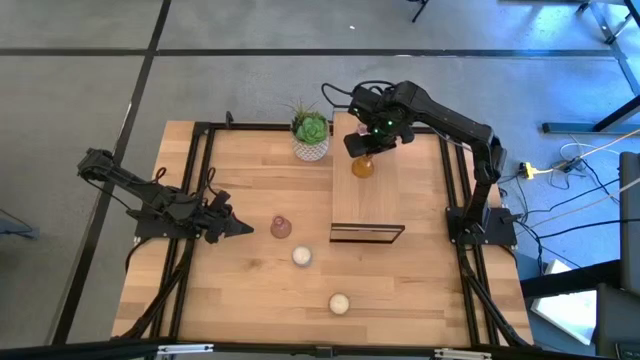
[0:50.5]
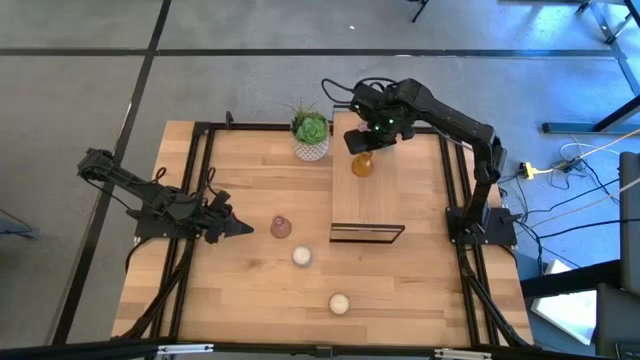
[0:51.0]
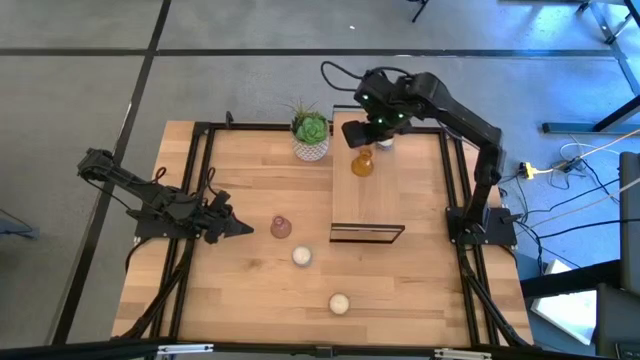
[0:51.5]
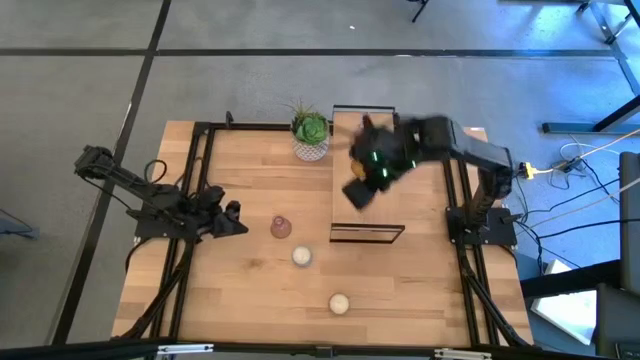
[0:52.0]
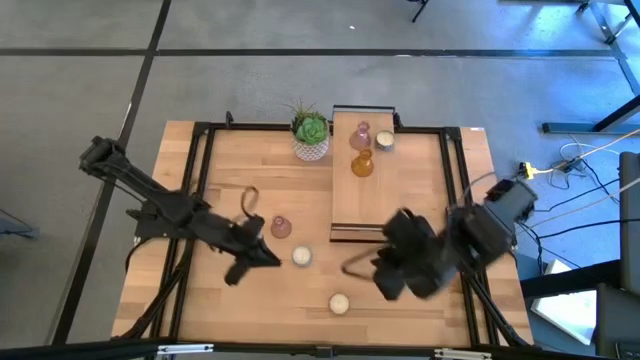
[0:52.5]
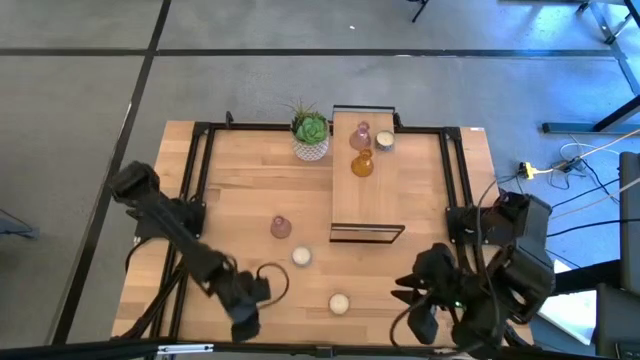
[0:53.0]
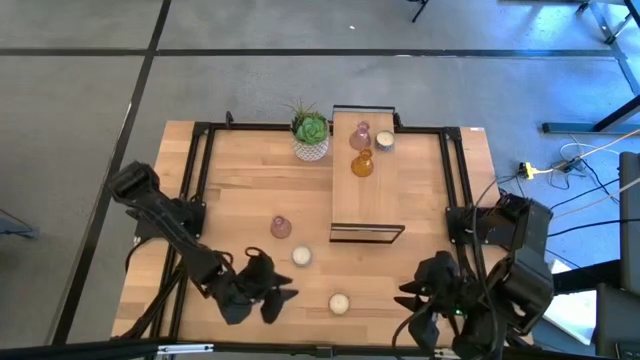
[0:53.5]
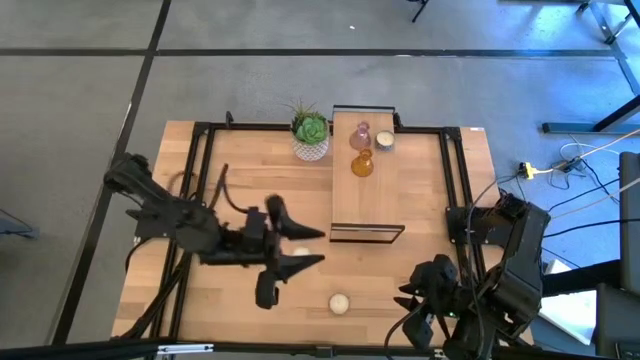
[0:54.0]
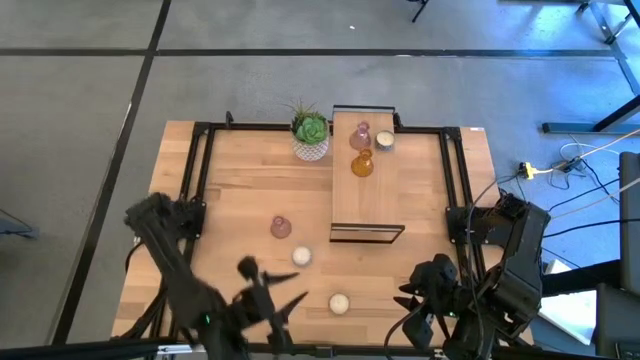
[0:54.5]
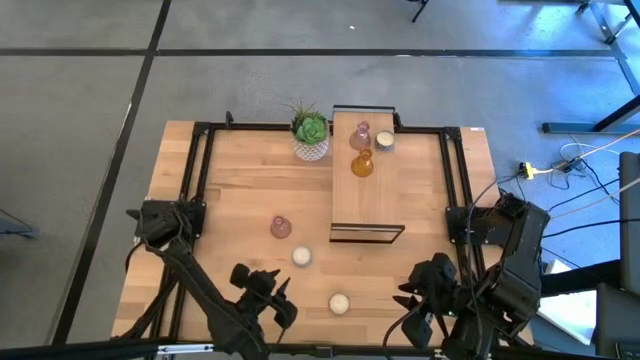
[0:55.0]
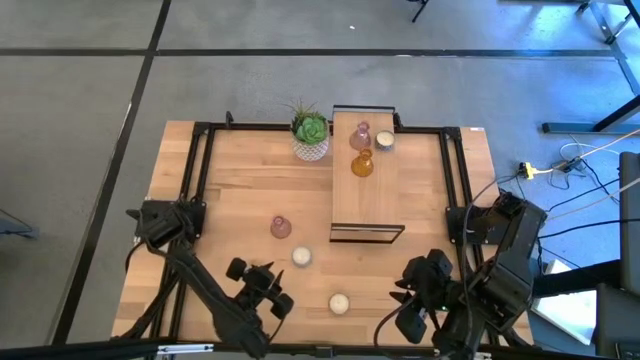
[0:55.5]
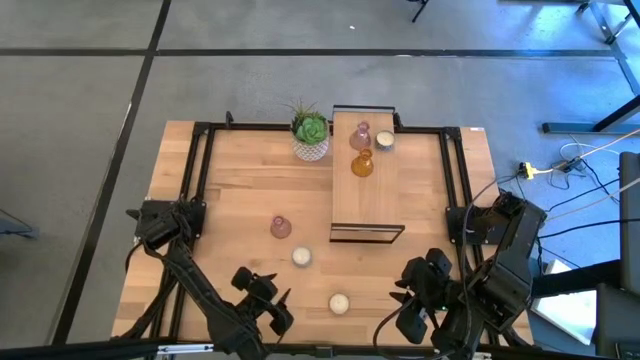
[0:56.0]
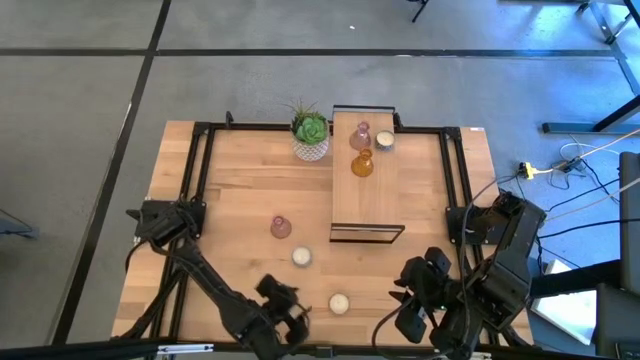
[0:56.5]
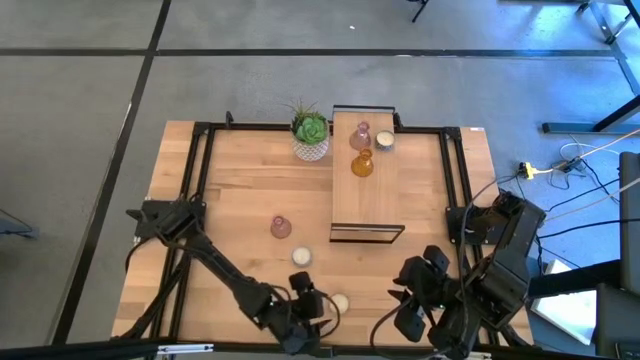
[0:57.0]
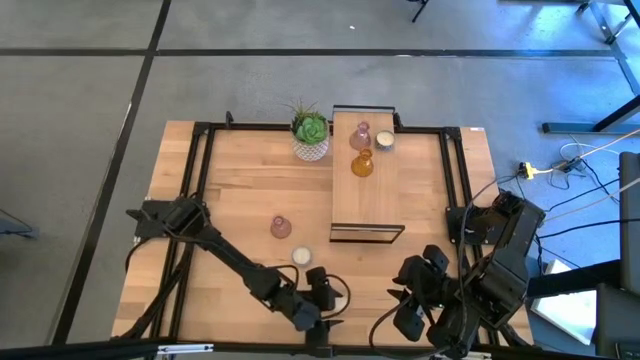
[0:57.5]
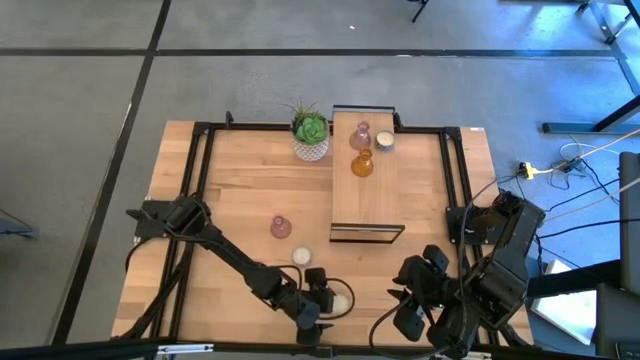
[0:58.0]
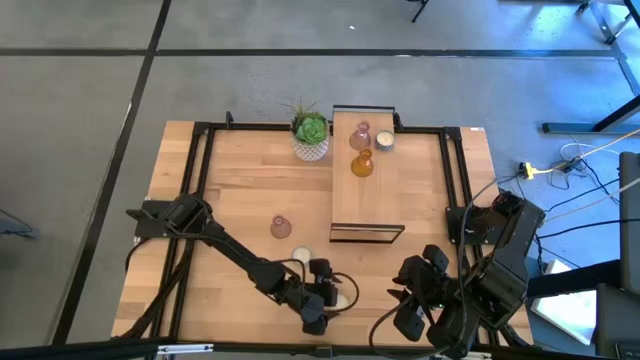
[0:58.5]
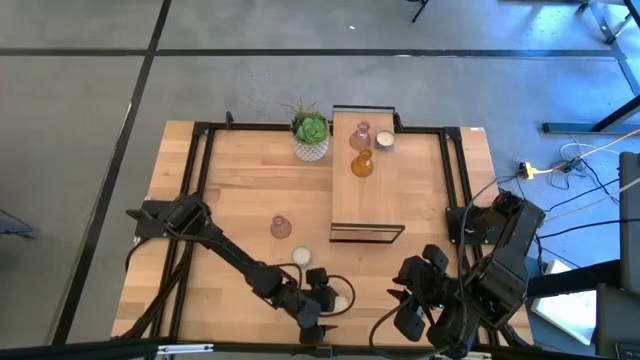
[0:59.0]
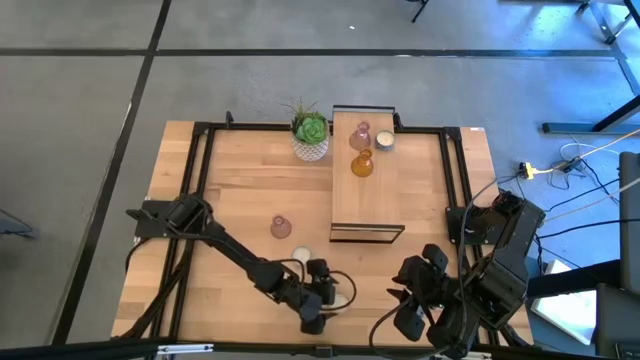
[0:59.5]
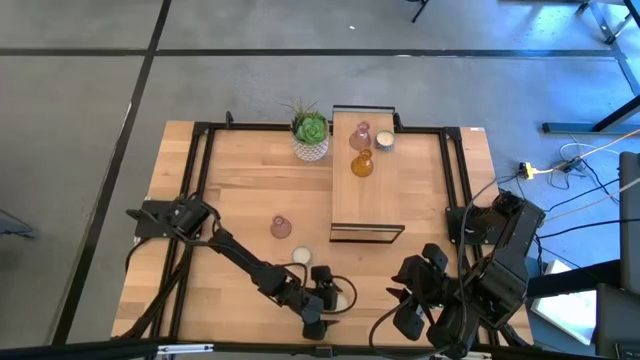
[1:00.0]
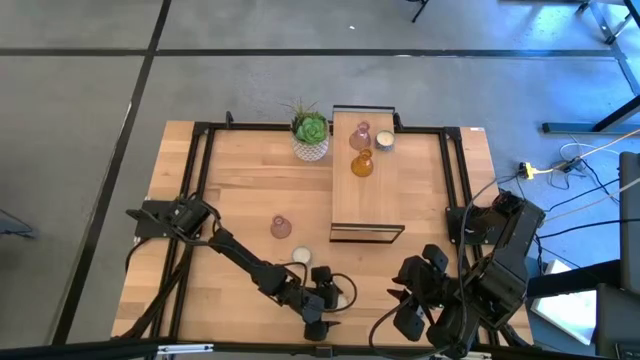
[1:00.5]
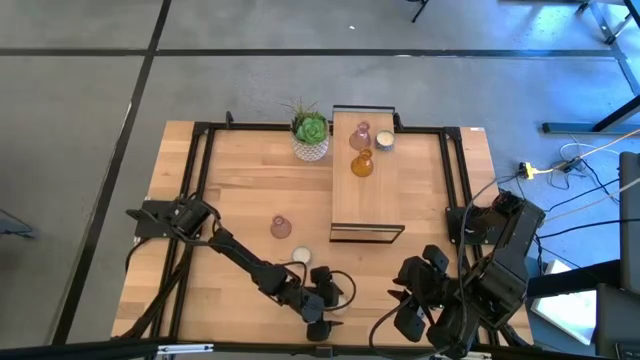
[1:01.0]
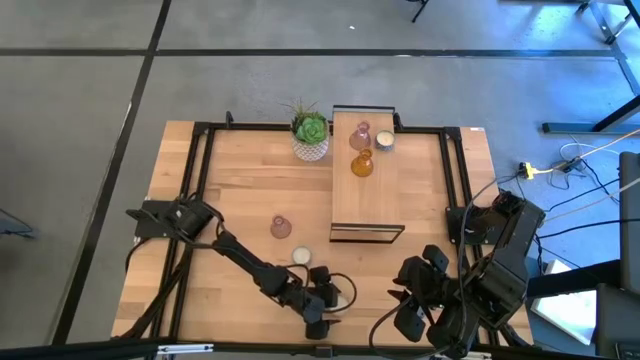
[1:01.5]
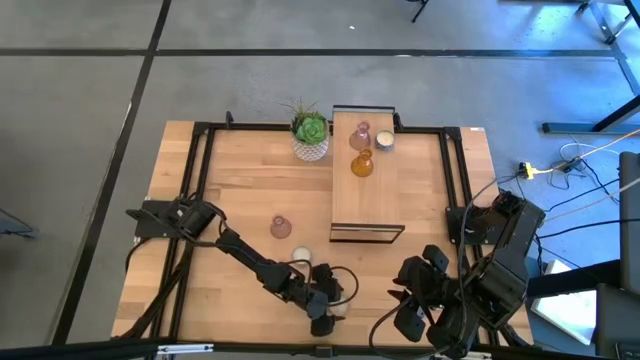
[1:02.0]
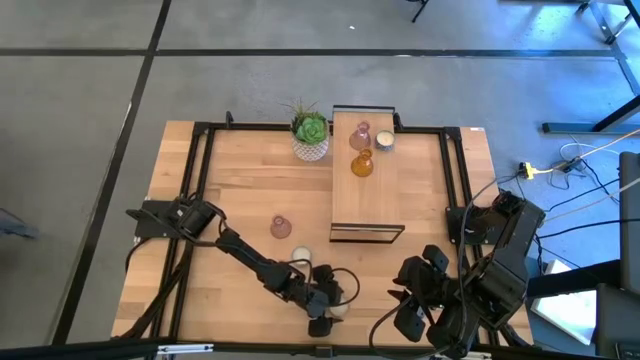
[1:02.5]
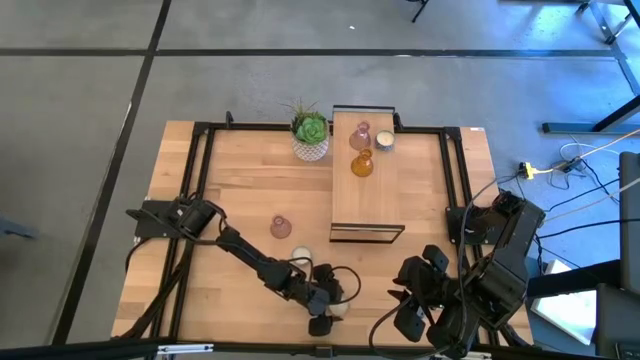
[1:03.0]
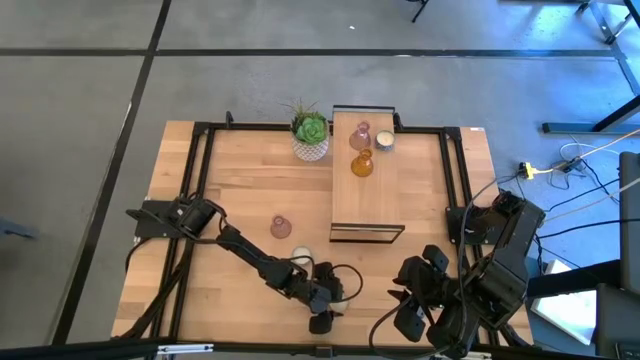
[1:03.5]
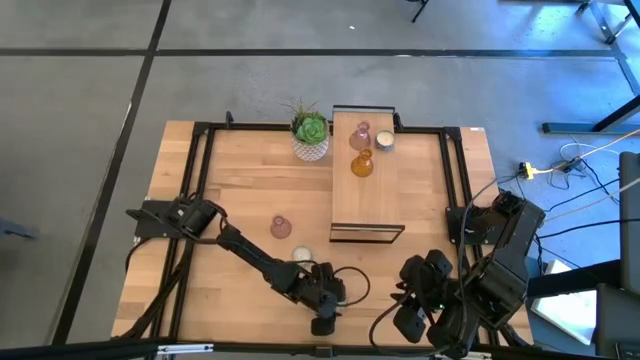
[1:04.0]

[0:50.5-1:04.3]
Task: Pick & Place candle stick holders
Put the patterned orange scented candle on the shelf aligned with the patterned blue scented candle

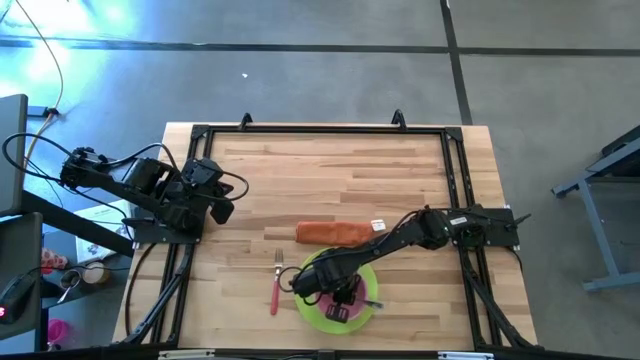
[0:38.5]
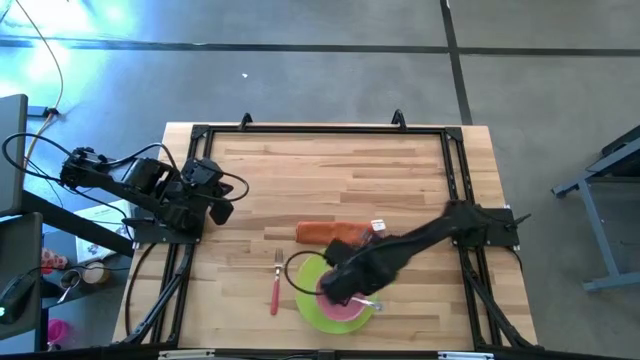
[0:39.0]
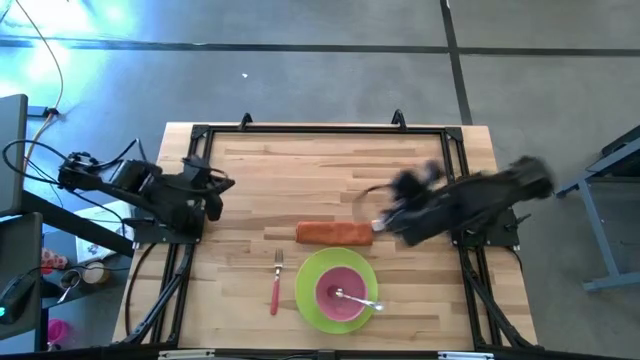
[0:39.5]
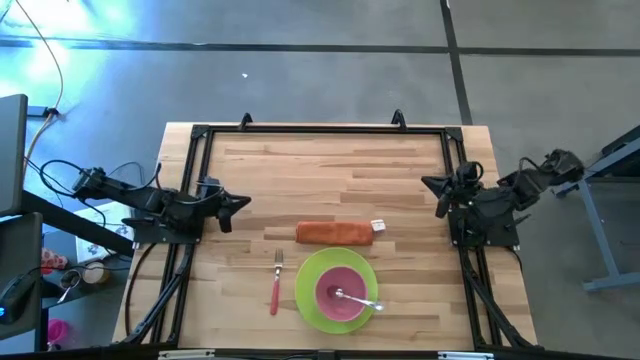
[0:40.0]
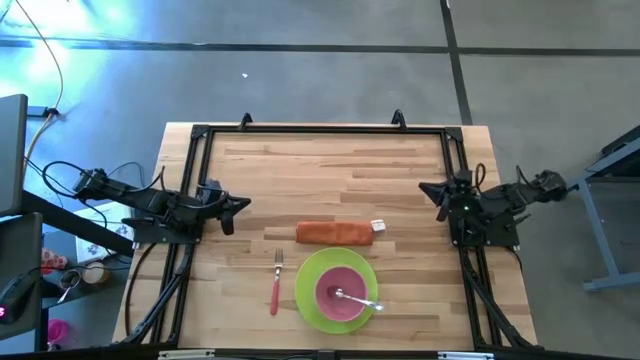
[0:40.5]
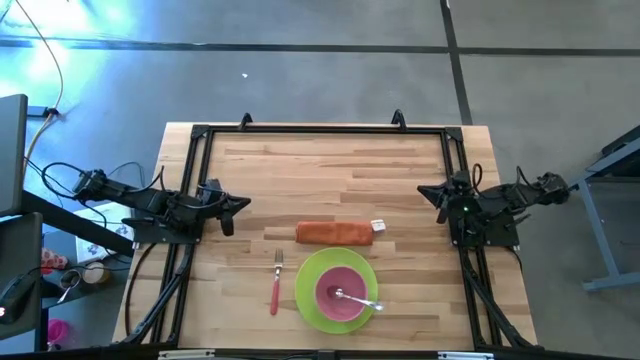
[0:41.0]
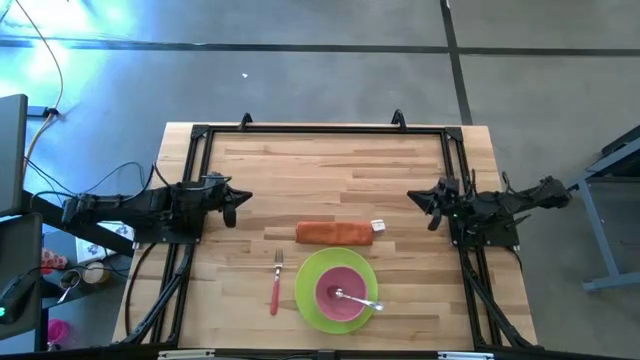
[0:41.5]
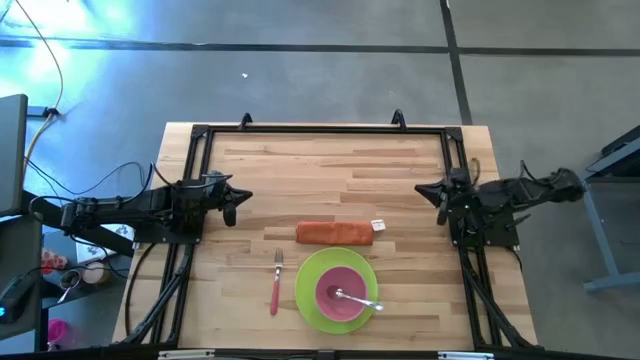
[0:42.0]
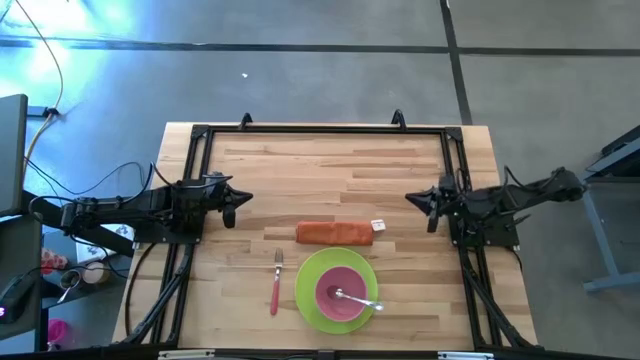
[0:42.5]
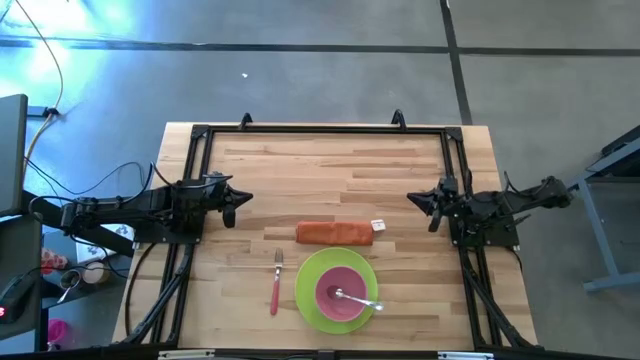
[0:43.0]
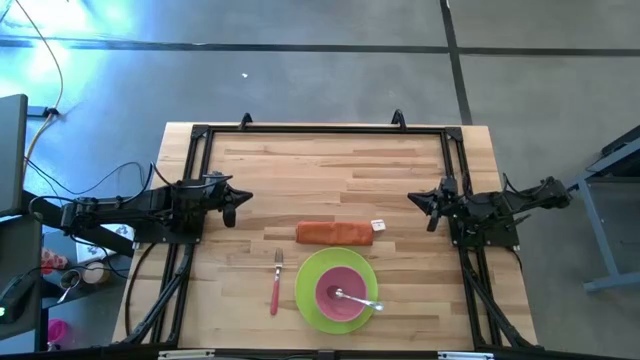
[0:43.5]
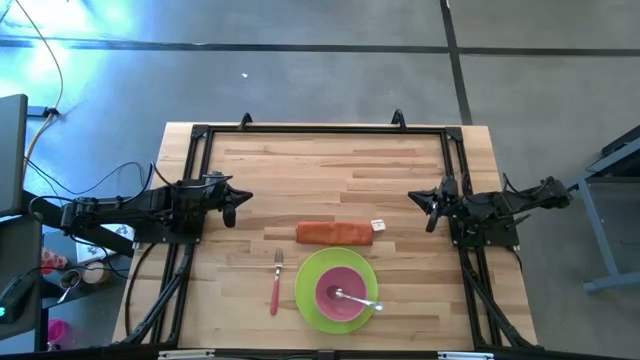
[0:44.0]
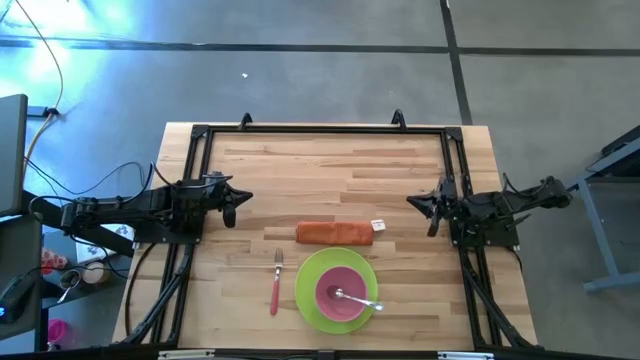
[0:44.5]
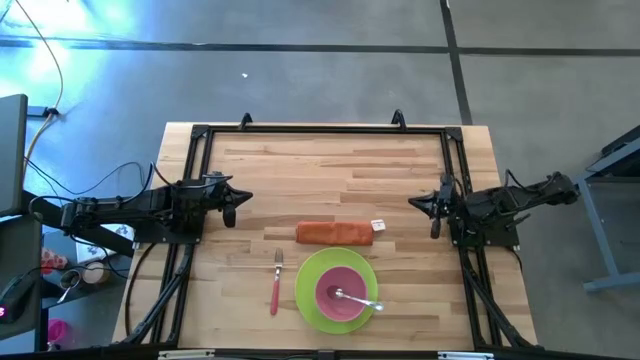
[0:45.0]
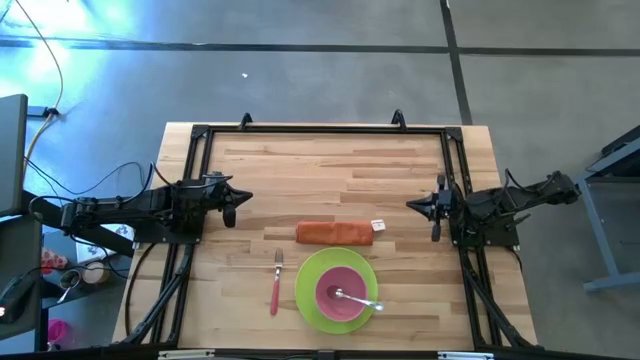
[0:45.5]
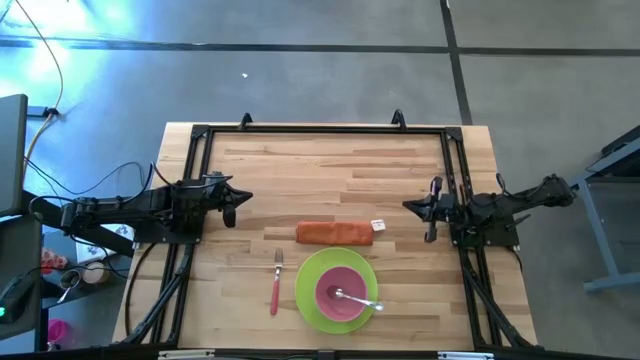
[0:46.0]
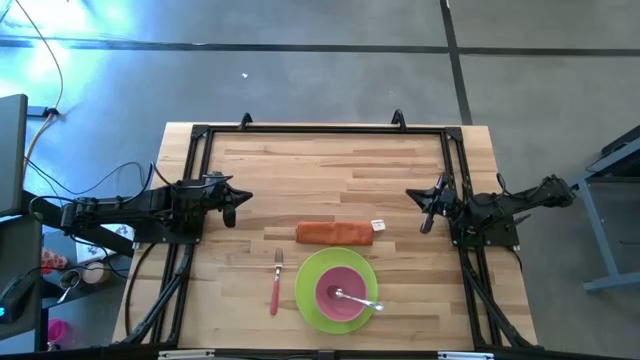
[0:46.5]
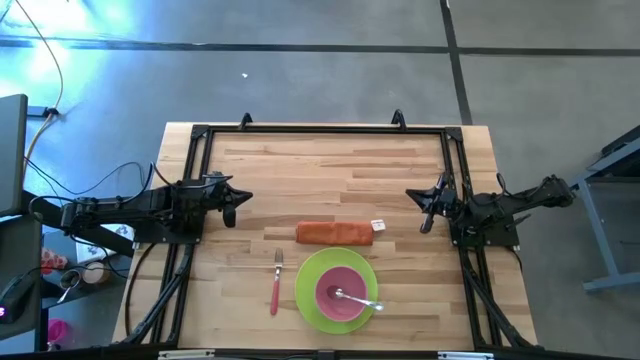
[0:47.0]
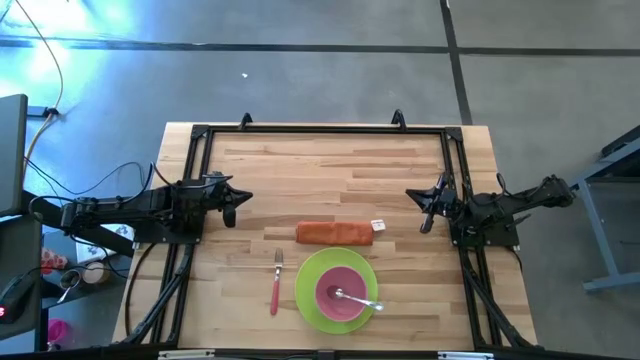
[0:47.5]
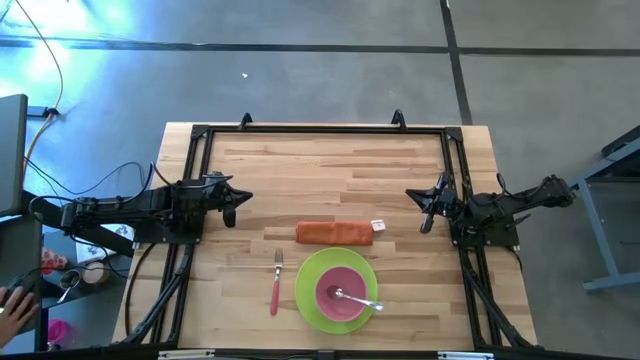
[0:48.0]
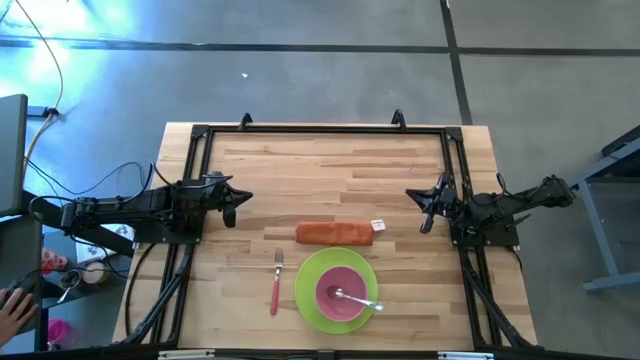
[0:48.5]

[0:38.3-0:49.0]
Task: Set table place
Return to Home Position
